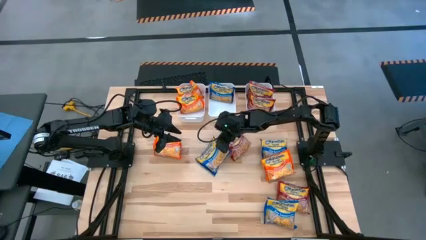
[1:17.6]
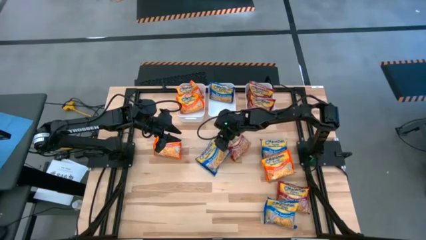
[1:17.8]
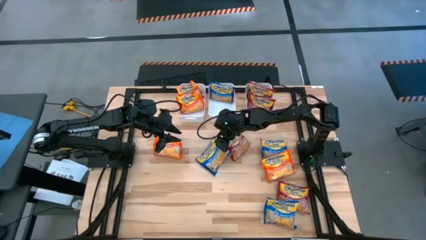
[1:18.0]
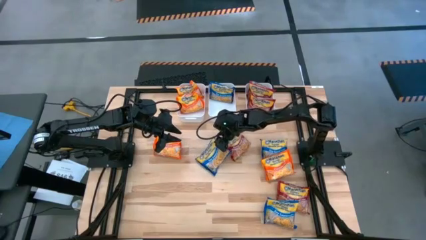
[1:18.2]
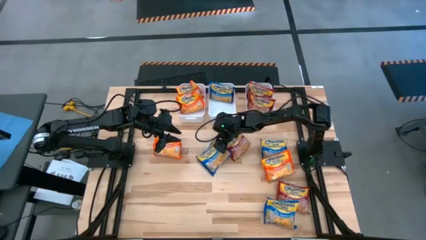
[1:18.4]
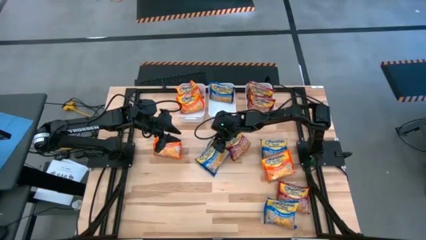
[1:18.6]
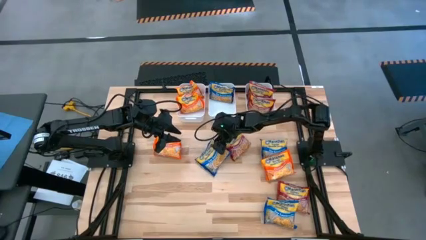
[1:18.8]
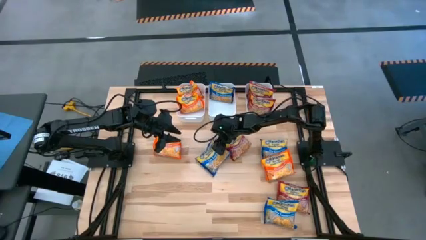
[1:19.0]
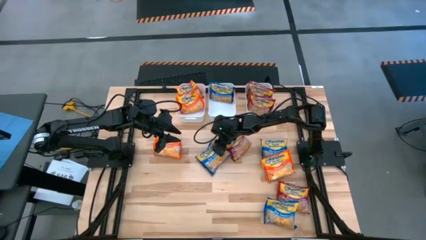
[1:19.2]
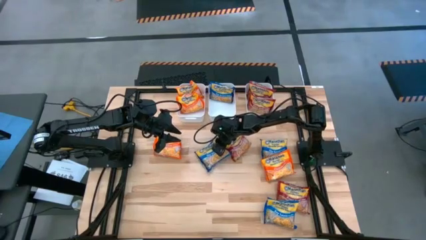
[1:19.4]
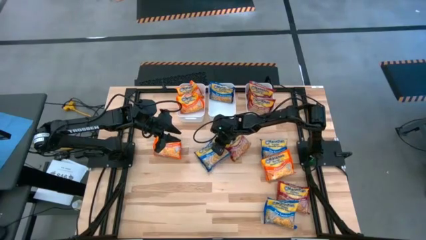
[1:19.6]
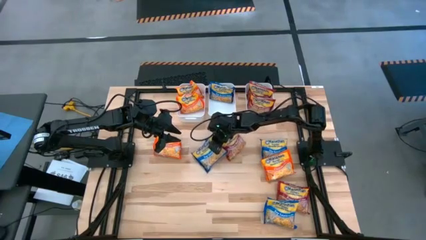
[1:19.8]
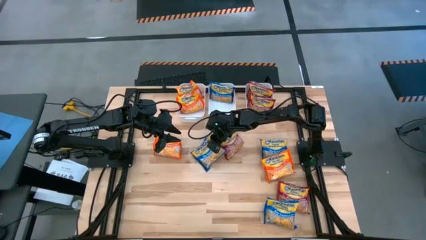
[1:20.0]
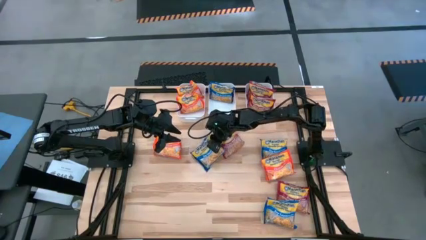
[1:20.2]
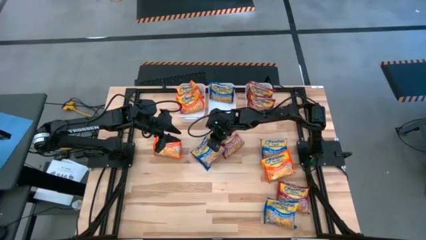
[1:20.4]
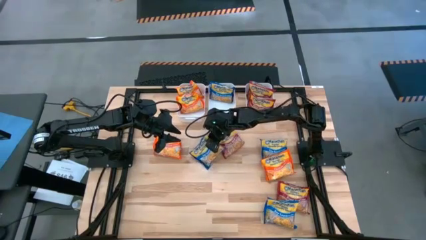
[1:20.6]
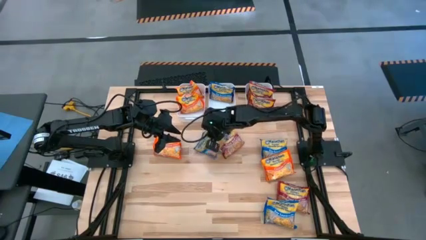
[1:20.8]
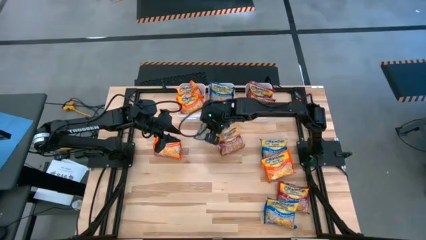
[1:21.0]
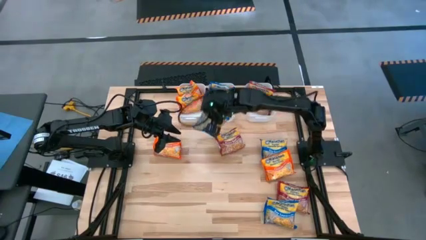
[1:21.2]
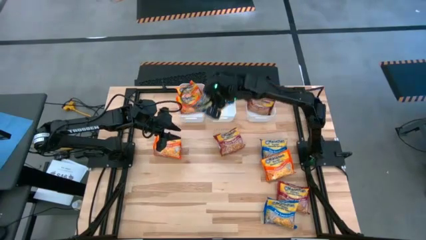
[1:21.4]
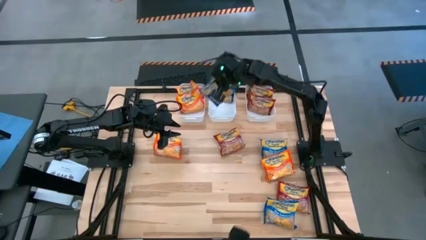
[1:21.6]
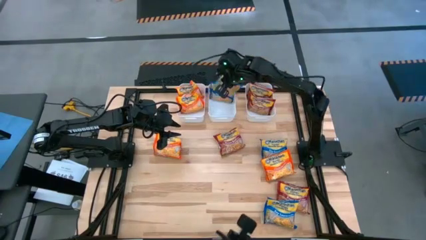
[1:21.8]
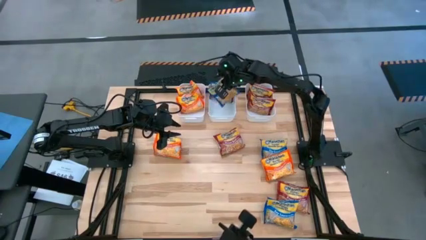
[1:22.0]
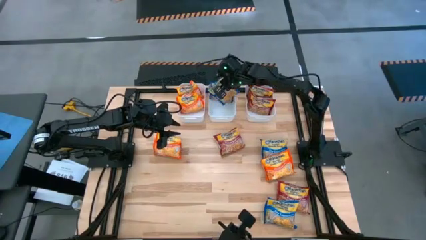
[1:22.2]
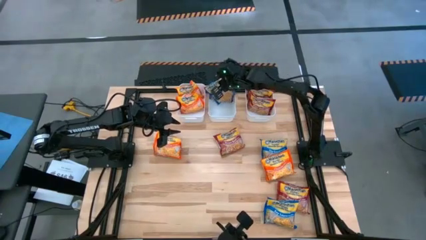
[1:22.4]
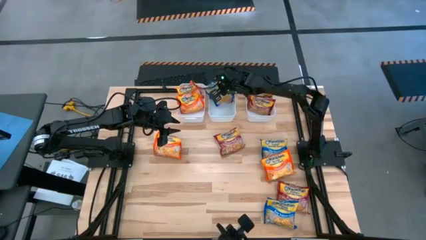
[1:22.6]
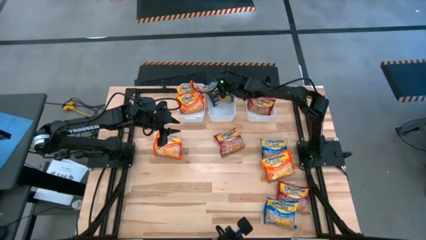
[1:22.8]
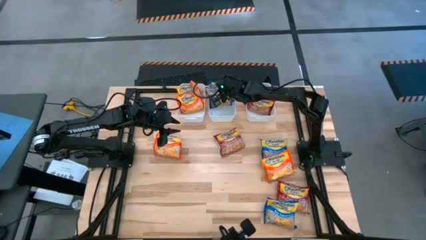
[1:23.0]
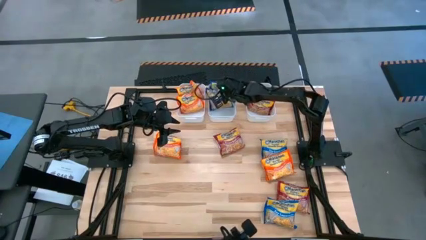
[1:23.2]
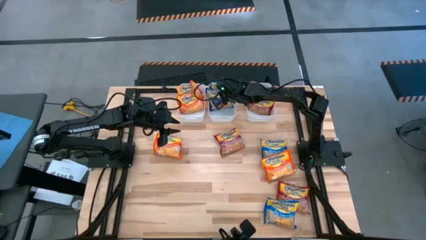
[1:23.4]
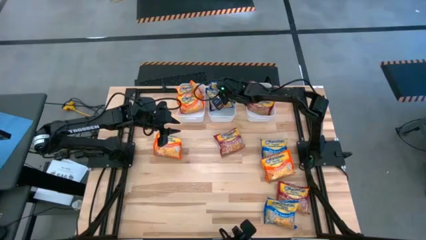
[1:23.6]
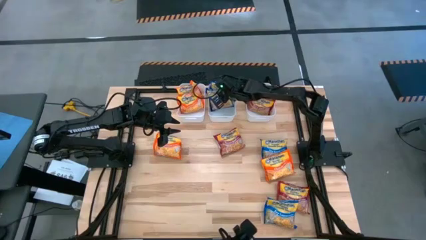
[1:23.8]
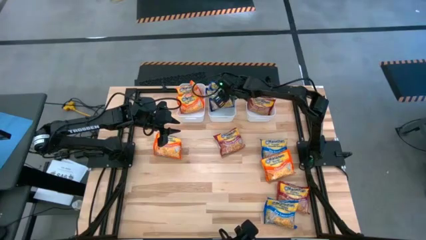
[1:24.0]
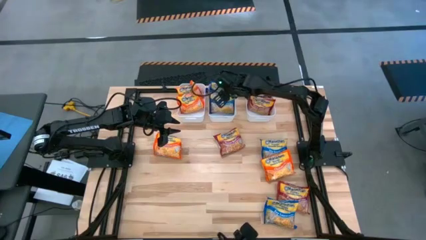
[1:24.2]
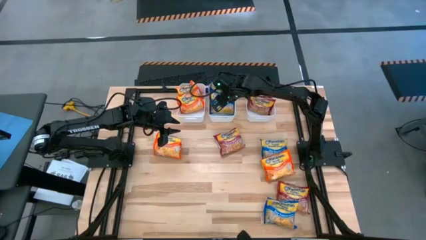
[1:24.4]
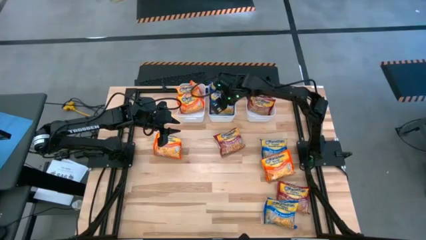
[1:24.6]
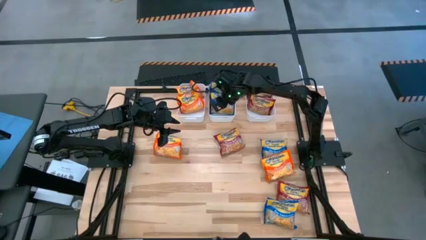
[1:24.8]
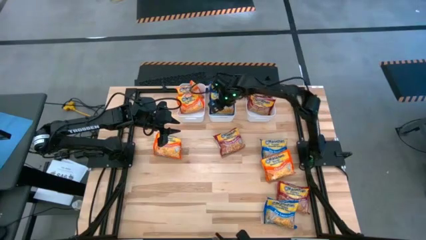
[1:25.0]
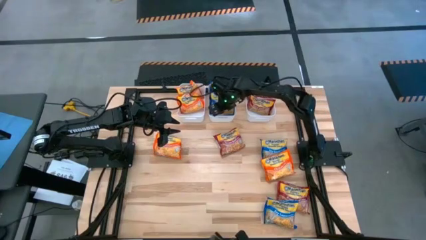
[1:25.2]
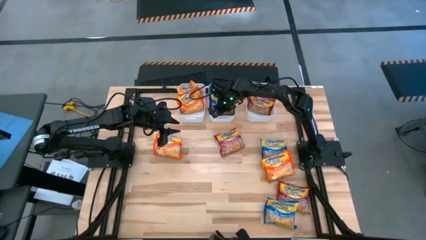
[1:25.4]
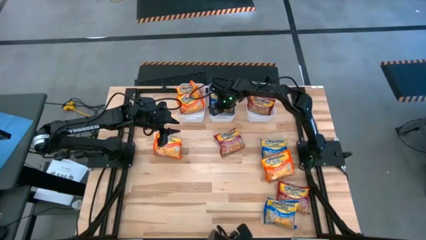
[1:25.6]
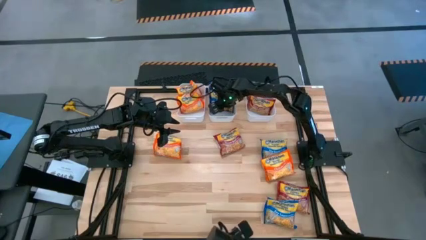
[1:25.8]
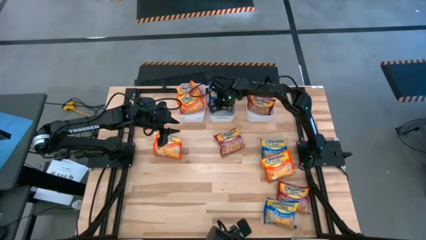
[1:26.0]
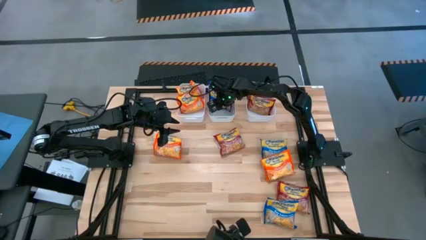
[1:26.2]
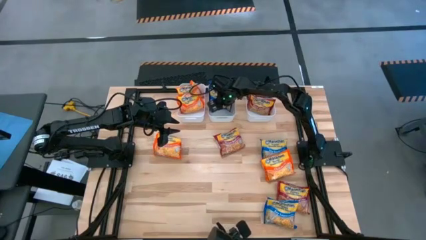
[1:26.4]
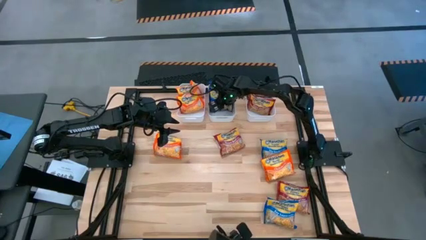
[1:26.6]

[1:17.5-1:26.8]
Task: Sort Maruchan noodles
Put the blue noodle pack into the middle white bin

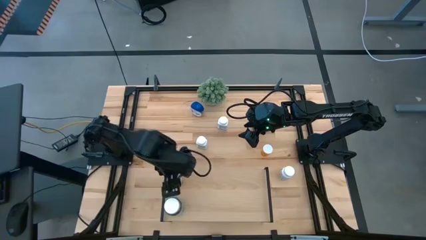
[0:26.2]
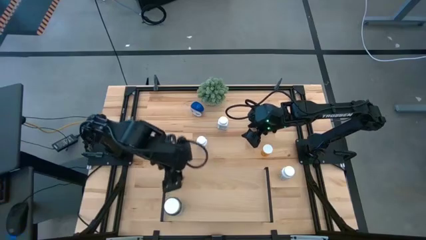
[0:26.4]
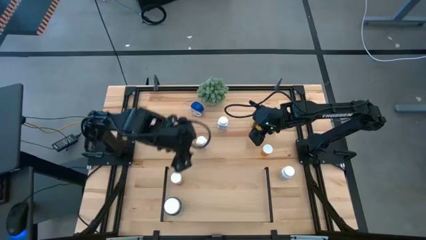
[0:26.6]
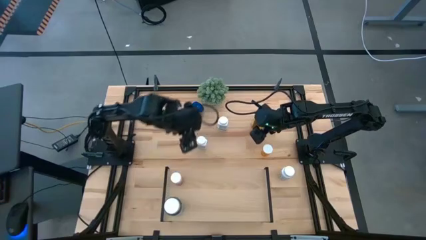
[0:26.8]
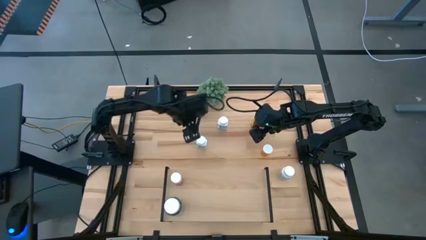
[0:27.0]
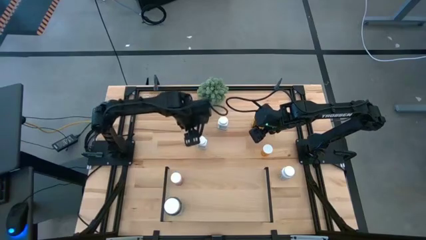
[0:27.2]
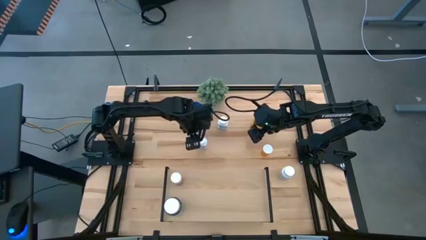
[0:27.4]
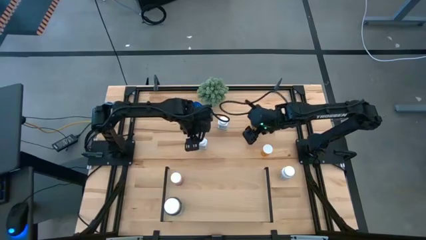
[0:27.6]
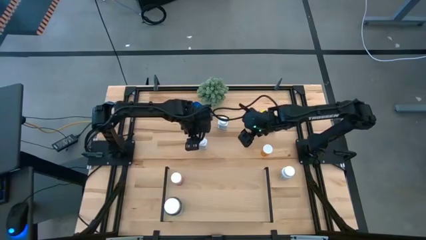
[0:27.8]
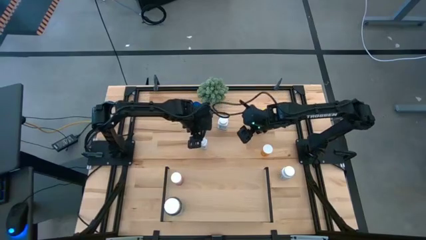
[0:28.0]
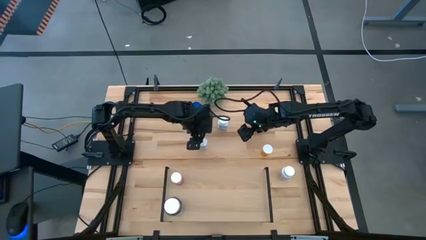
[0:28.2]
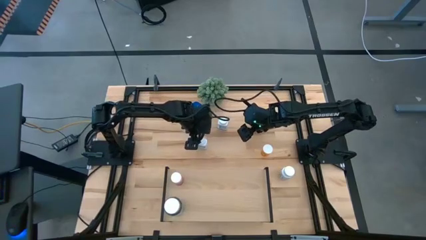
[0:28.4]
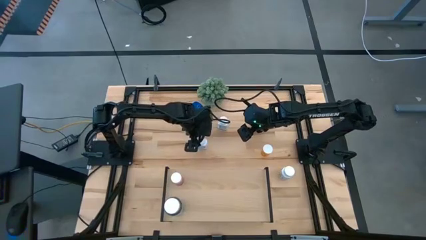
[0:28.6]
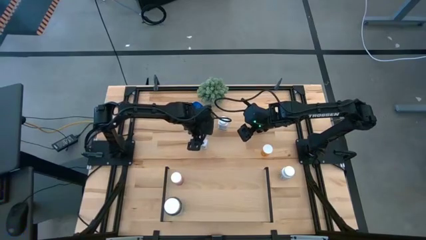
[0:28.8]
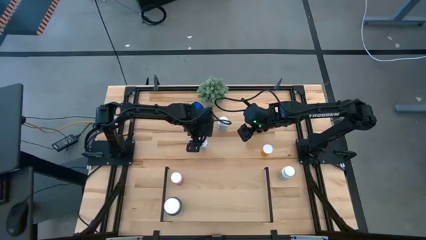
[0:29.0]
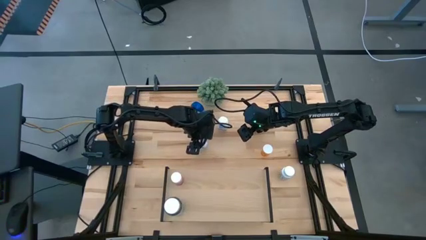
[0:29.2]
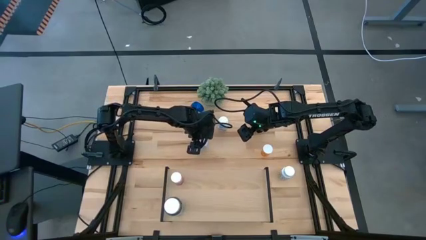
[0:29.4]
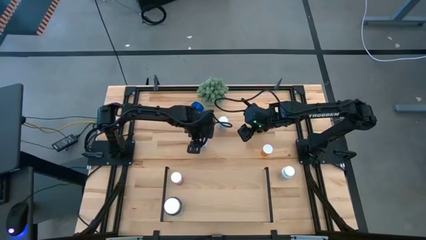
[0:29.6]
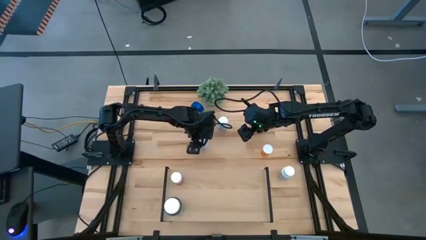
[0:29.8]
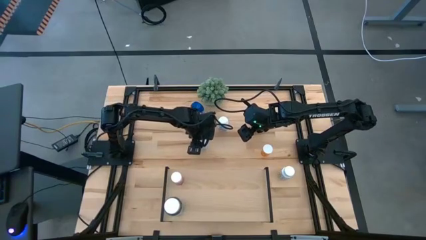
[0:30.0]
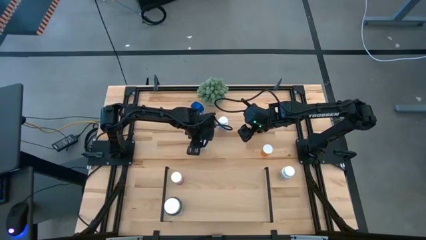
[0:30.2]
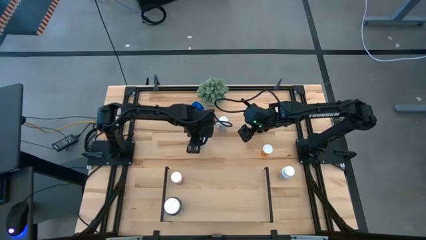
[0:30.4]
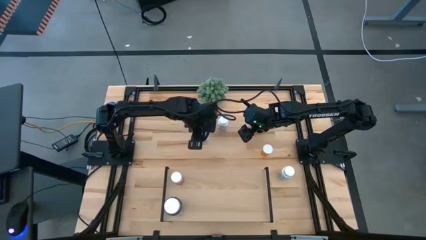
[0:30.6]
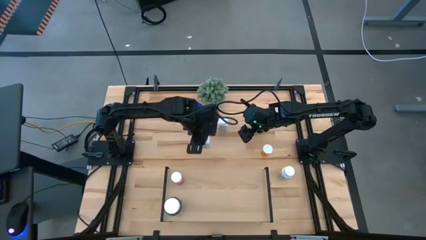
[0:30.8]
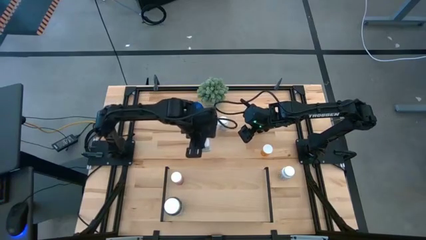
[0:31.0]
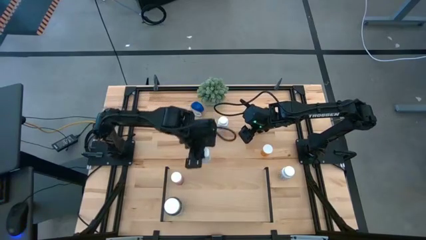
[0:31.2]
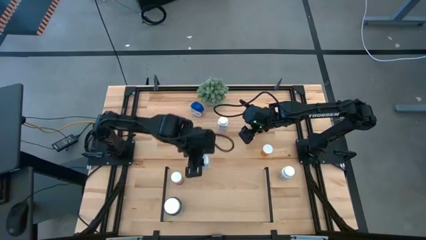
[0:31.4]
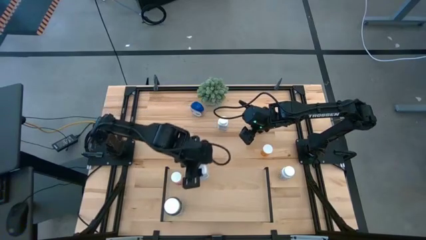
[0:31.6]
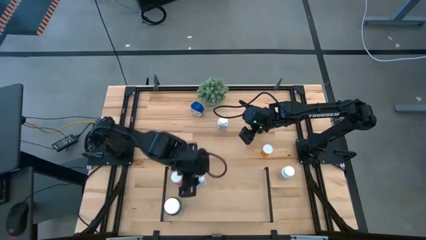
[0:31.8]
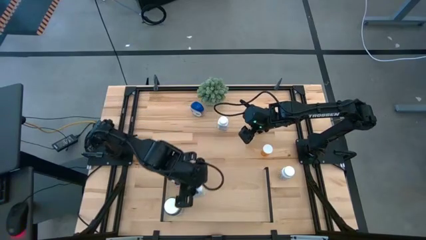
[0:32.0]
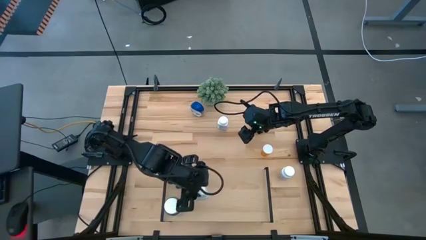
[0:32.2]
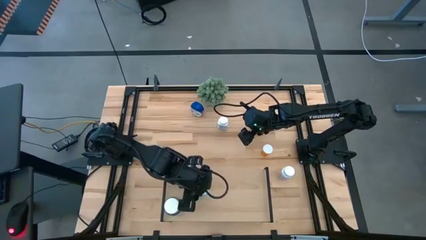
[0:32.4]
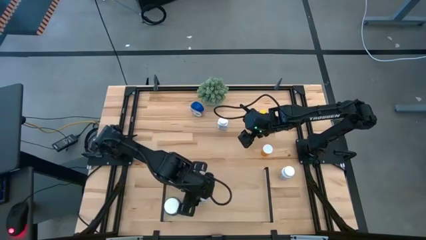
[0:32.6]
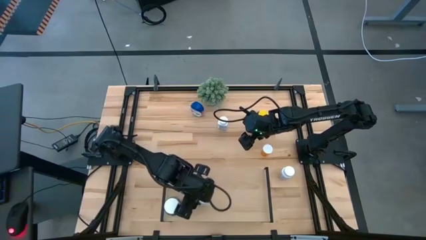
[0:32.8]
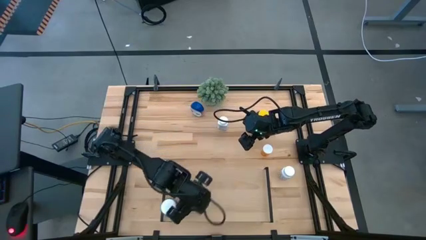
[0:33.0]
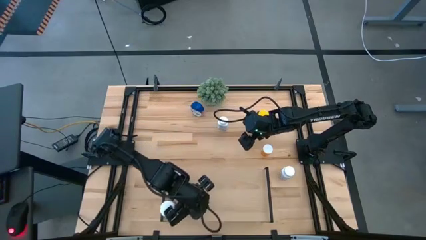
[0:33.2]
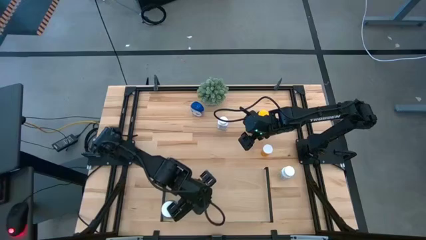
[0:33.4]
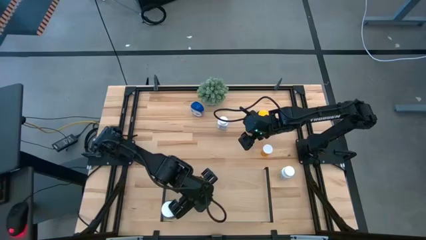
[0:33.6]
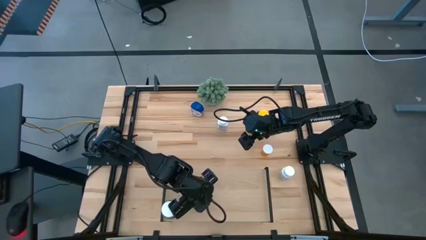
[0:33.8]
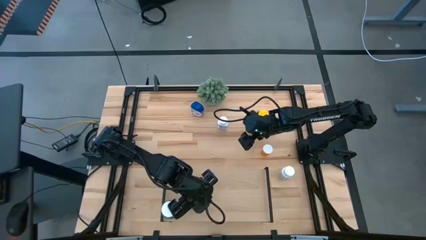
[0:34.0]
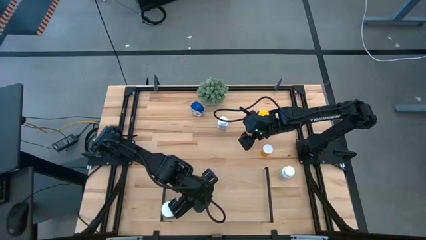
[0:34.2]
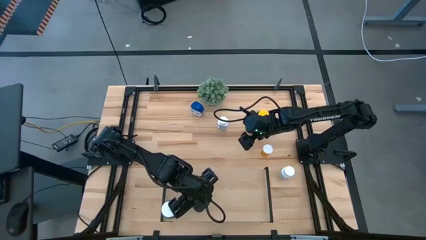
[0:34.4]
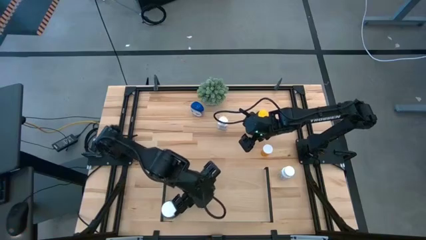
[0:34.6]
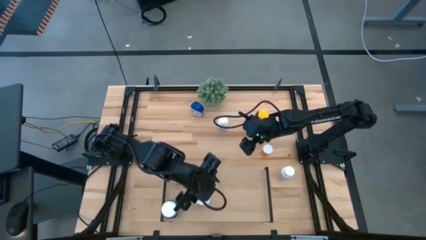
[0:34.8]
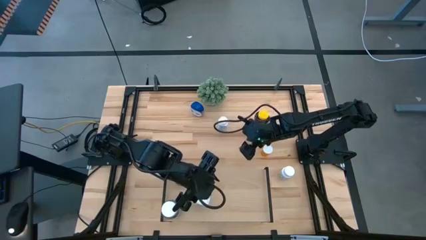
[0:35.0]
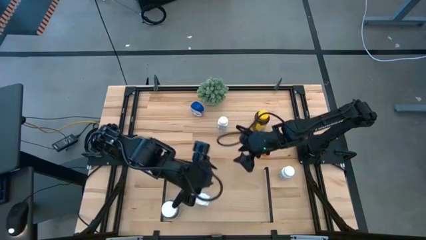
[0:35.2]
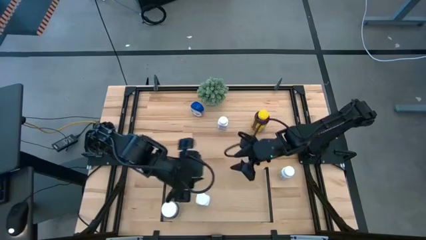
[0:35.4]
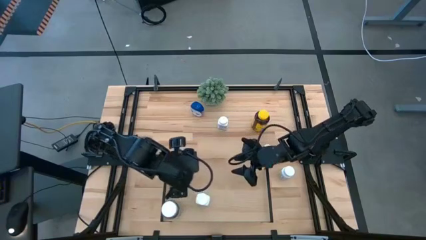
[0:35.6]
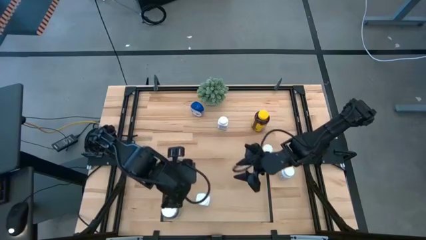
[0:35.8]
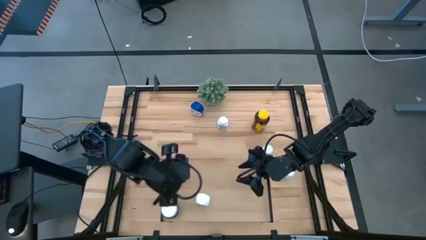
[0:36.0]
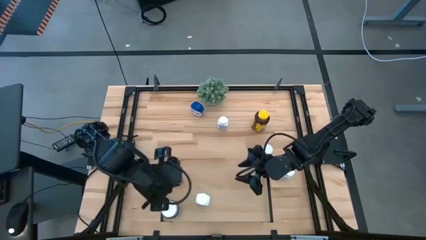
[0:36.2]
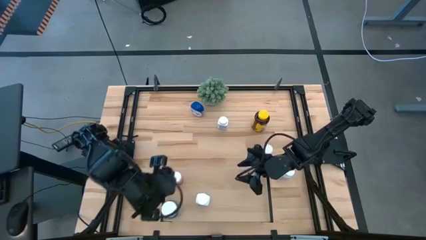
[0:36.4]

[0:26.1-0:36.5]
Task: Pick and place medicine bottles onto shelf by color
Put the left white pill bottle on the shelf
